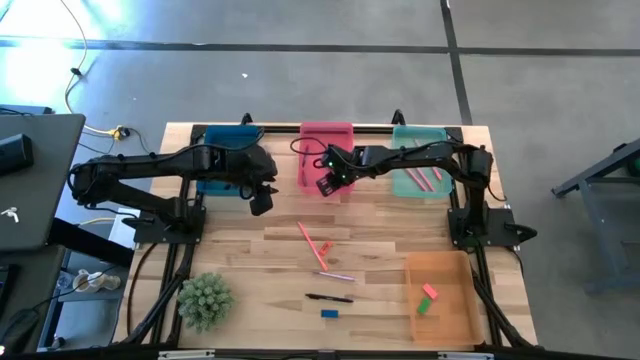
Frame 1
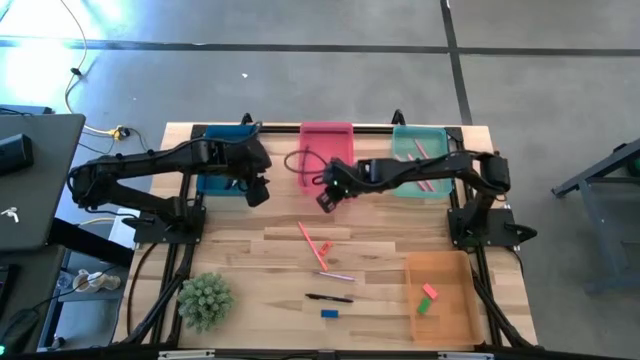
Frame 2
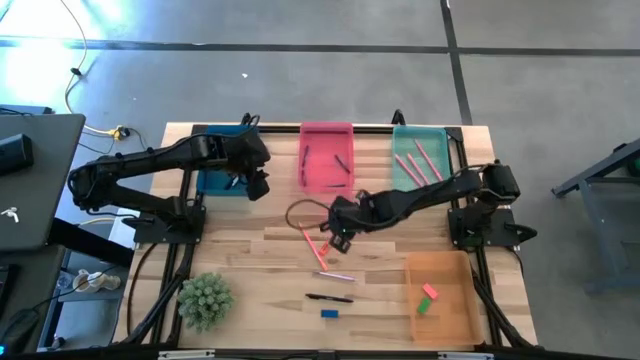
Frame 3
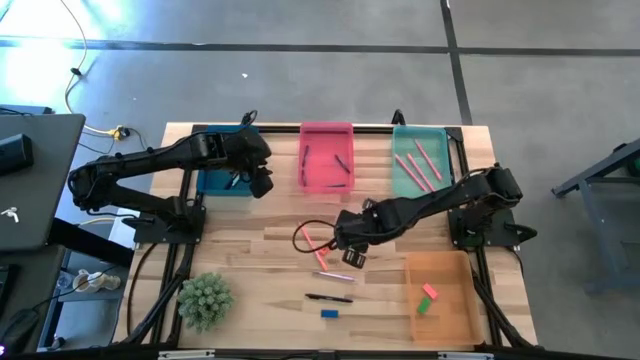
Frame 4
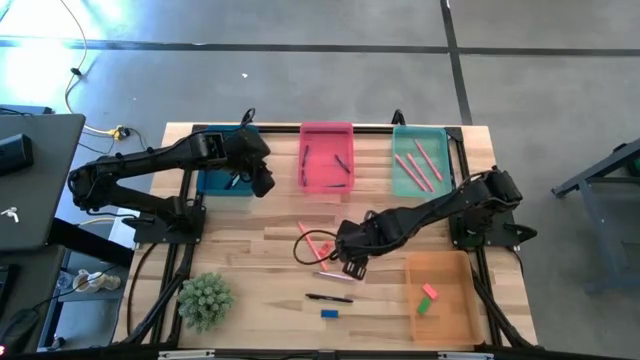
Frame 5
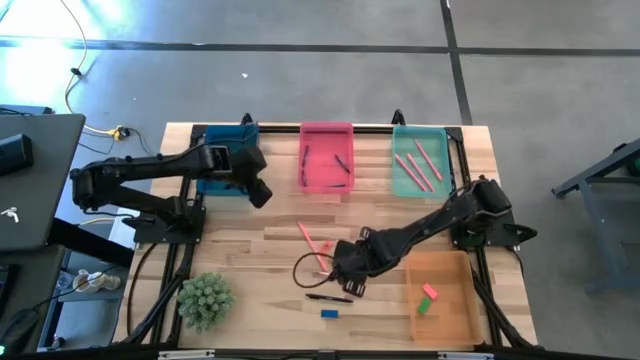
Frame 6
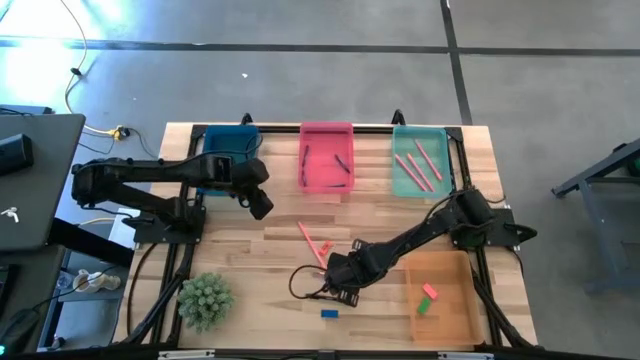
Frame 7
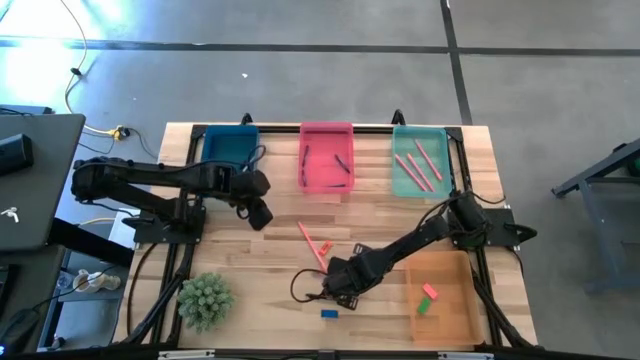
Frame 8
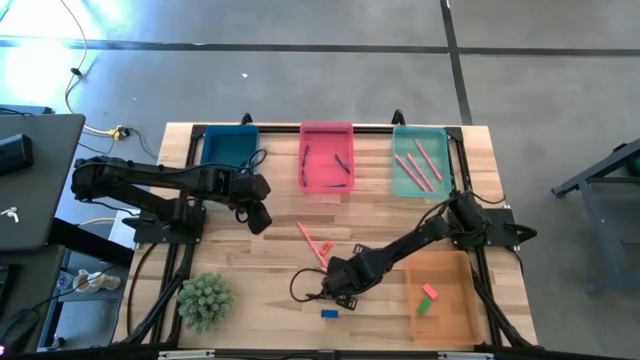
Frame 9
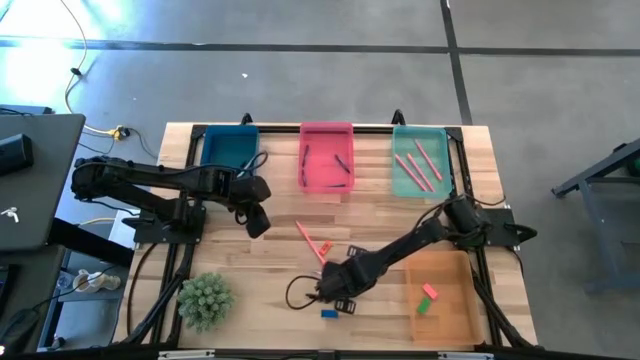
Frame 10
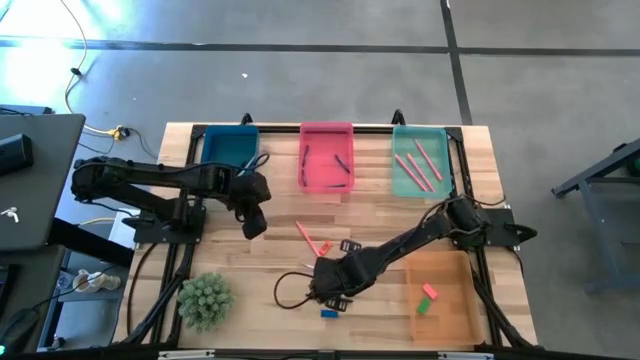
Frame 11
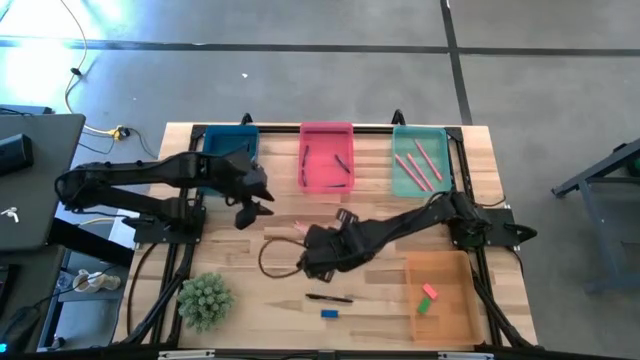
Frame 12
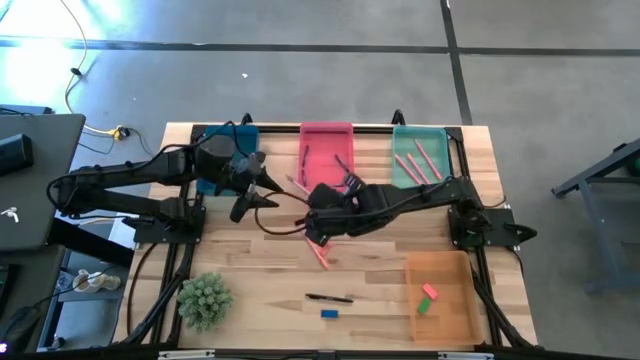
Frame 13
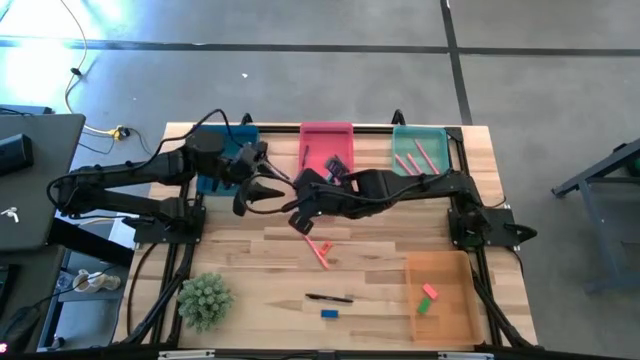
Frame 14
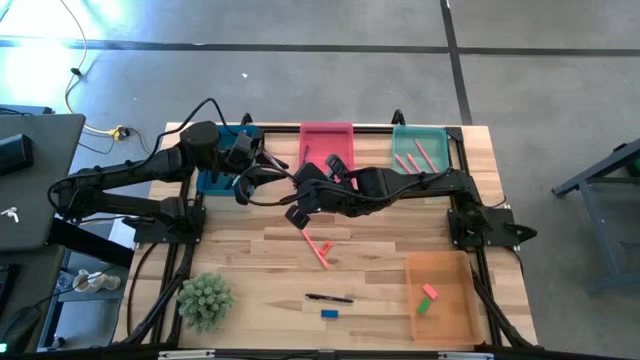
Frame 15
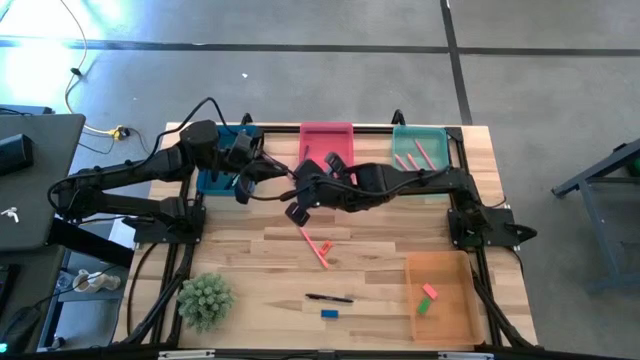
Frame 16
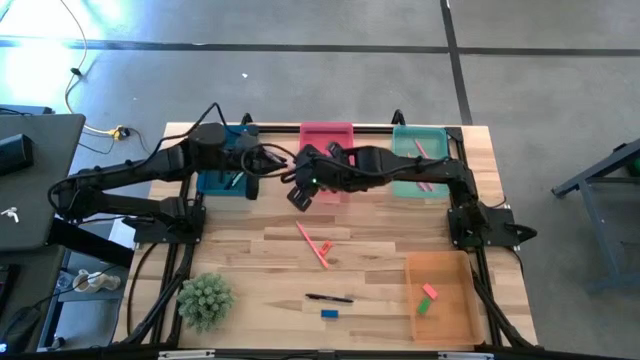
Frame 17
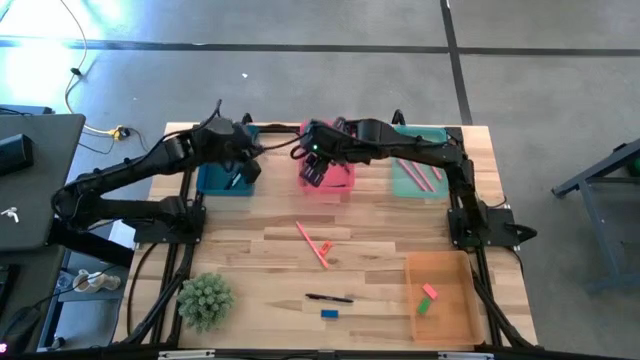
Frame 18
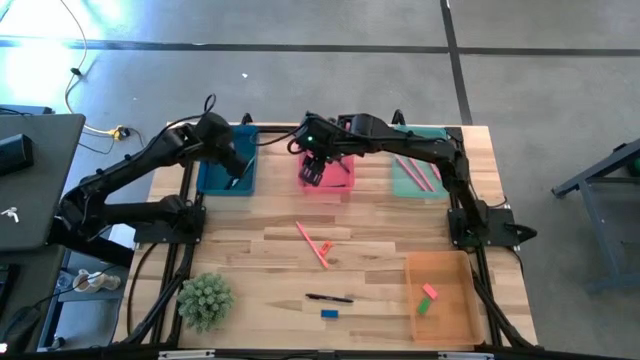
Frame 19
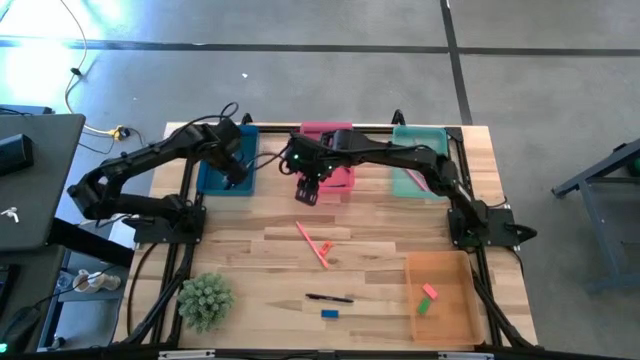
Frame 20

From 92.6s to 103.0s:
Task: Sort crayons/erasers/pens/pencils in bins
Put the purple pen into the blue bin

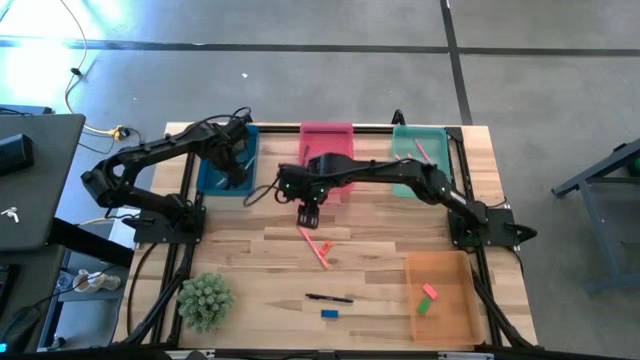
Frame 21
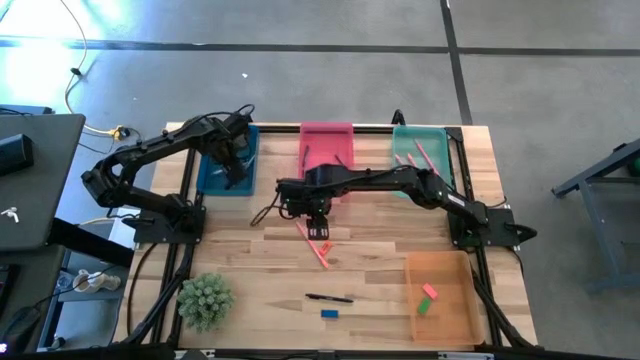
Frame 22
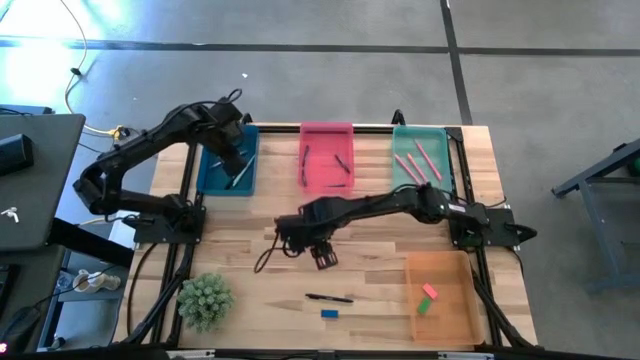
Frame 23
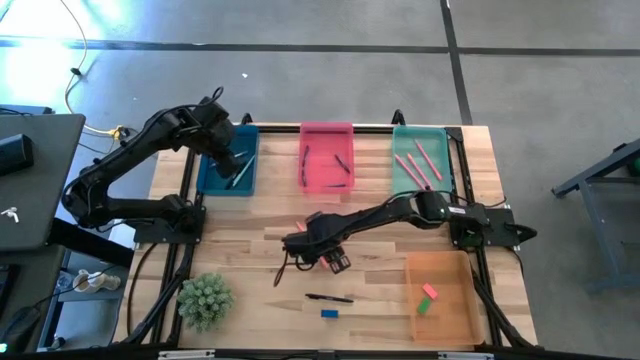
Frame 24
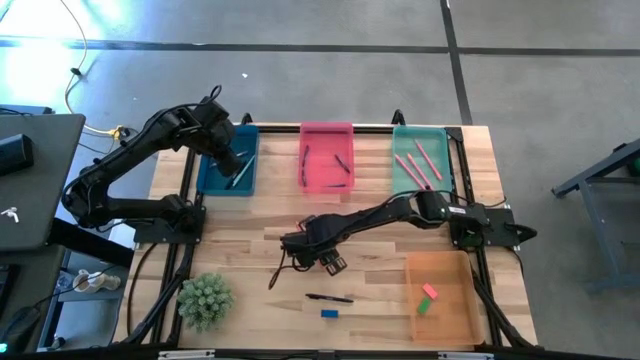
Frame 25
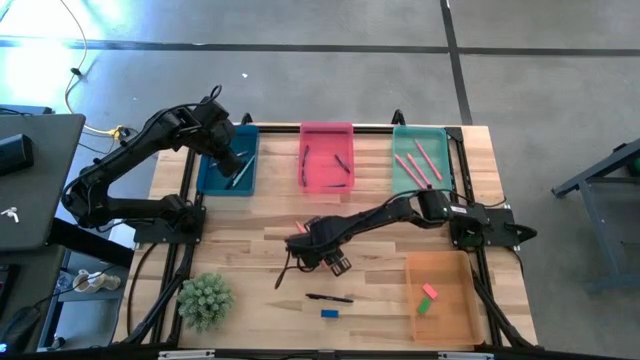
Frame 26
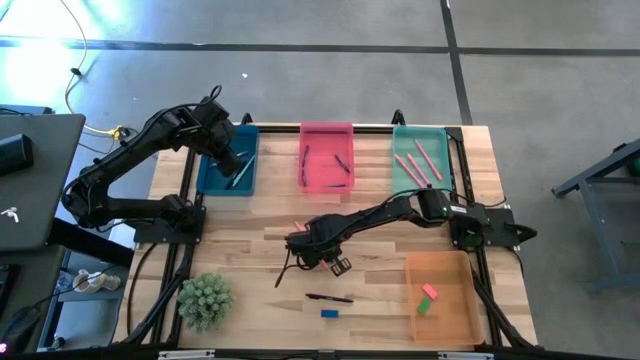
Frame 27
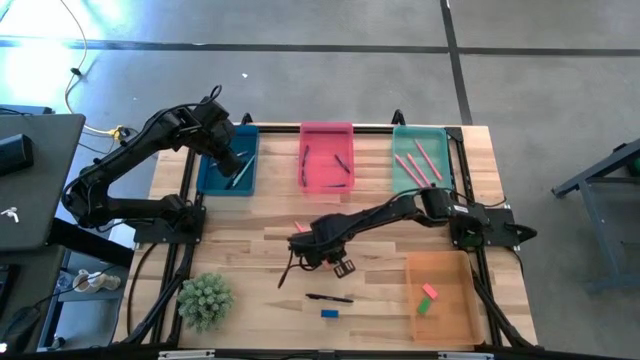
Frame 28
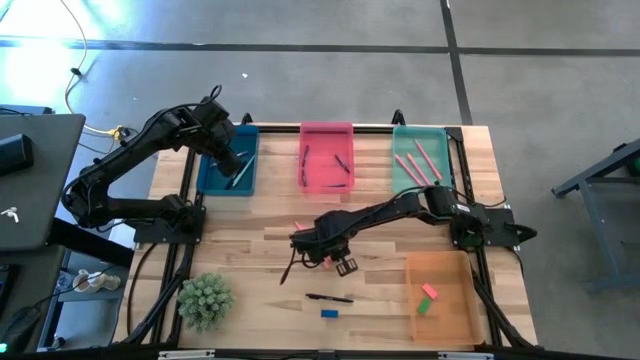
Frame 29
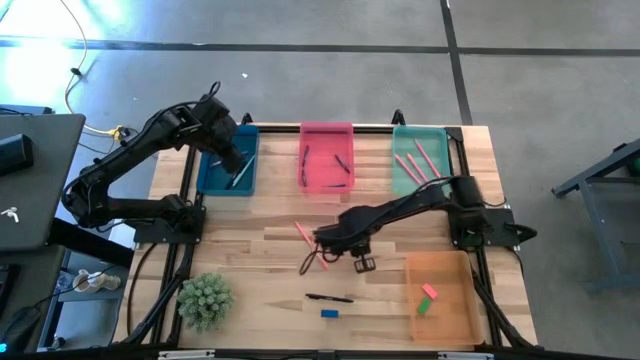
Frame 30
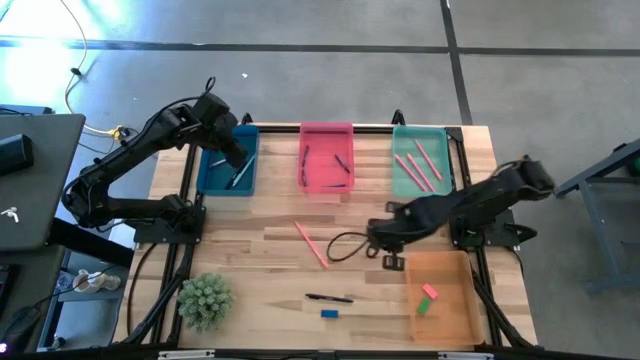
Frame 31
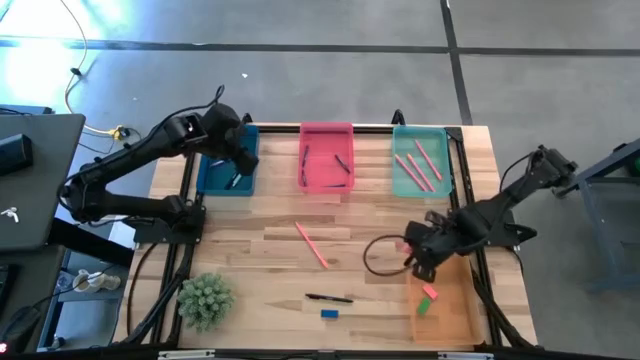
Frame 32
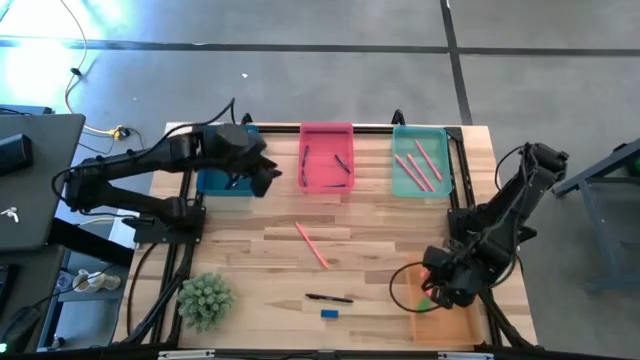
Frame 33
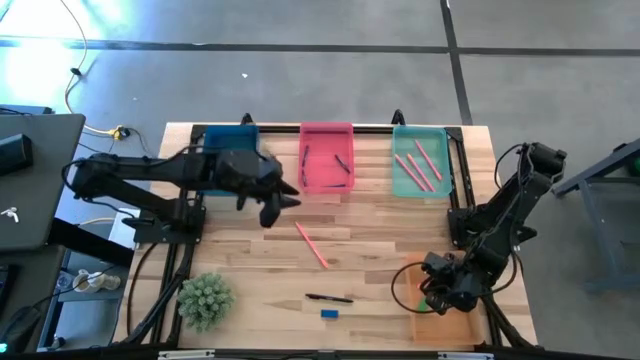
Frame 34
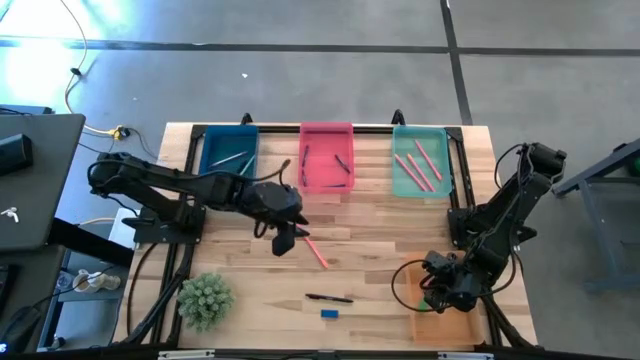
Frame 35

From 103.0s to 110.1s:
Put the orange eraser into the orange bin

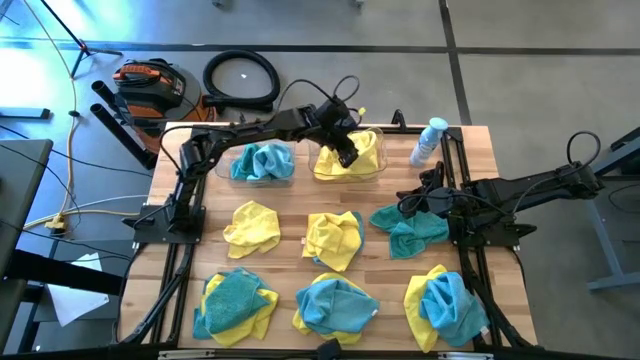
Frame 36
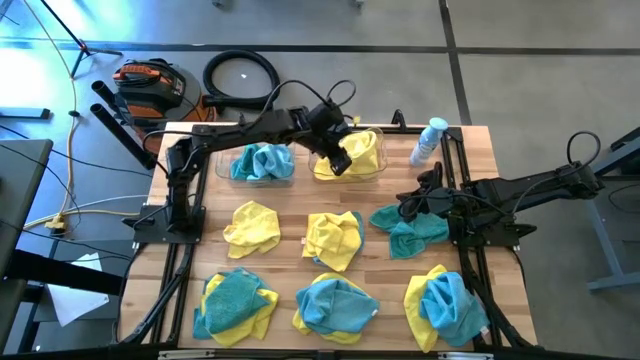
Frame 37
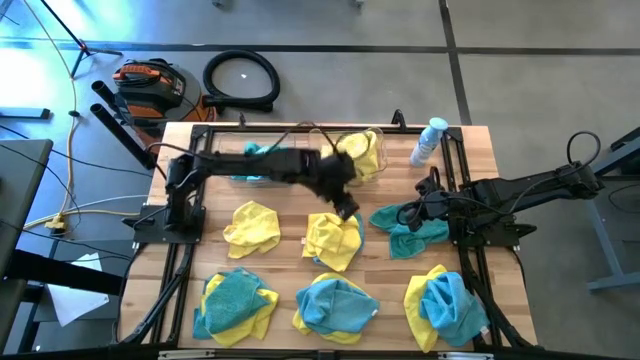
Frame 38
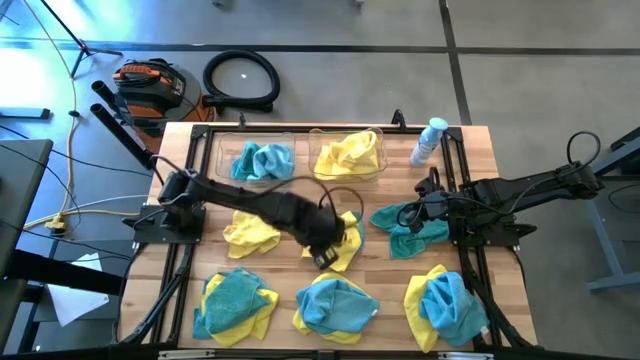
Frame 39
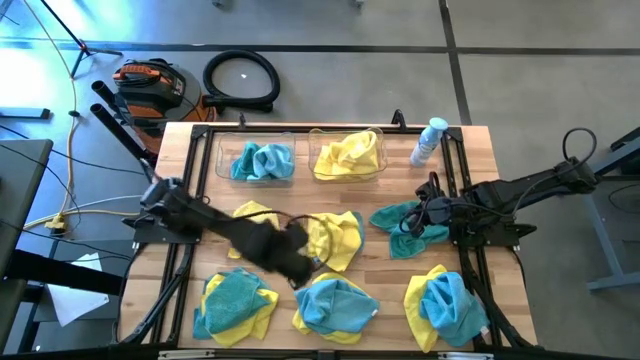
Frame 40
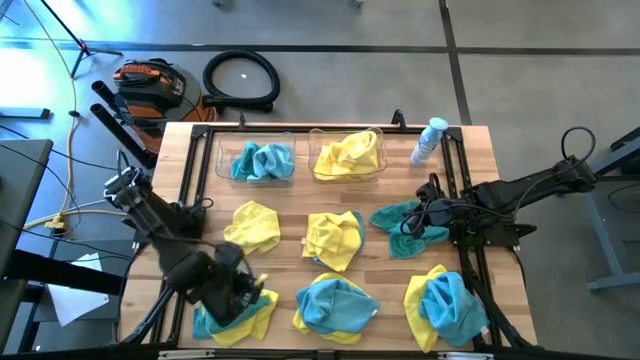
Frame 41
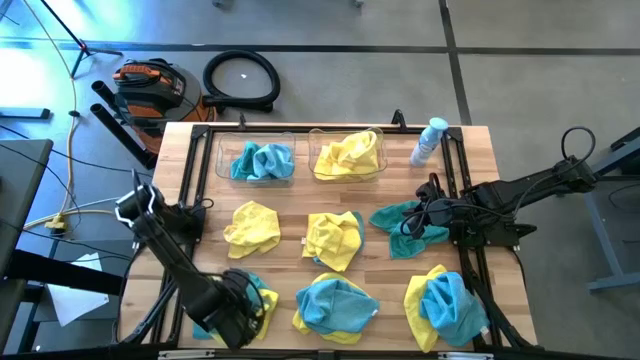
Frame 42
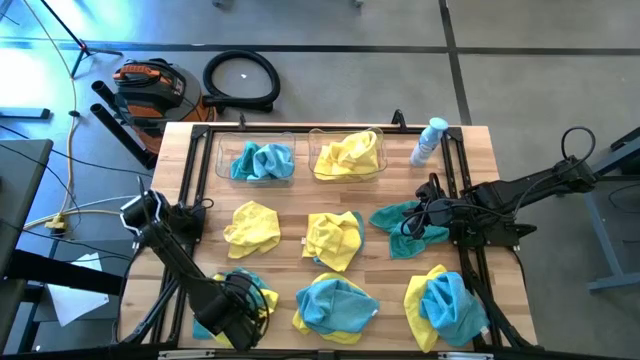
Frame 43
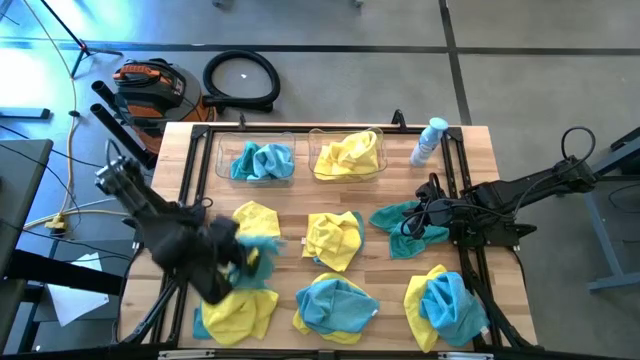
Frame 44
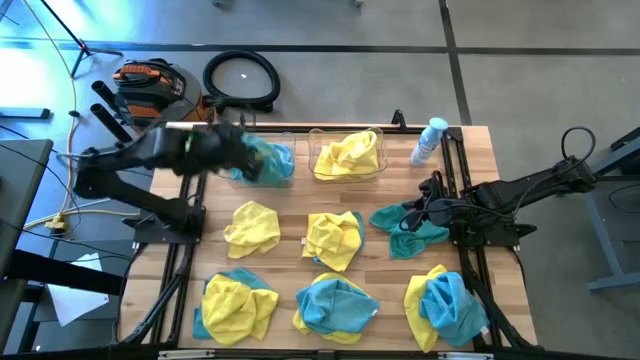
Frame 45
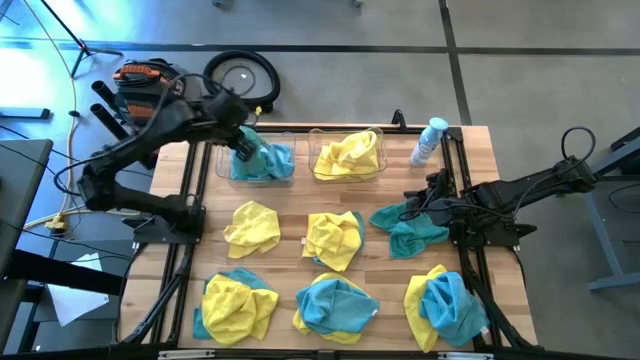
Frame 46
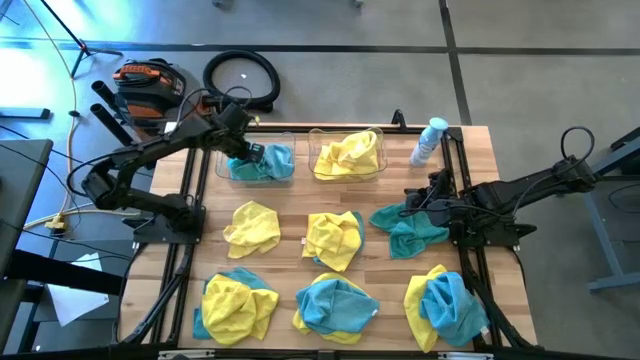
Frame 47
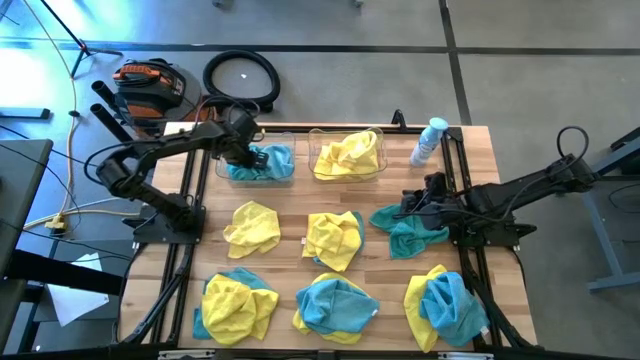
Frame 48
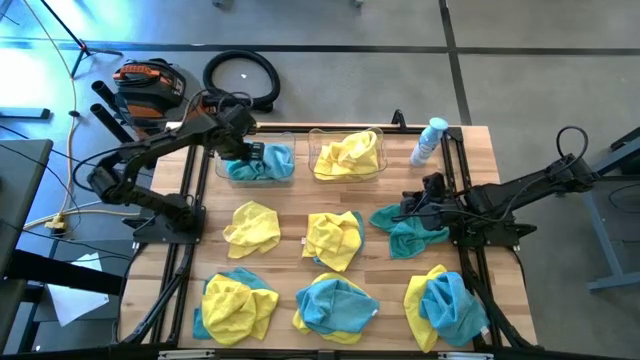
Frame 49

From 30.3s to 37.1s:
Task: Sort microfiber towel by color & place in baskets
Put the blue towel into the left transparent bin
